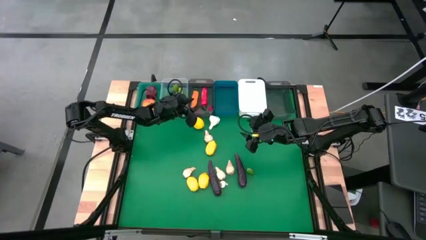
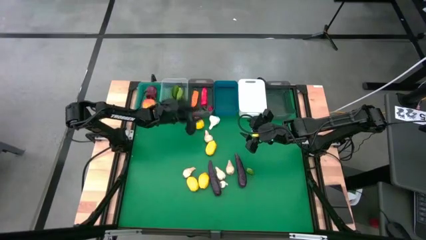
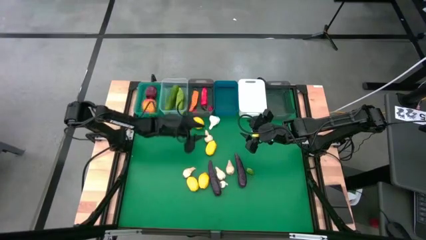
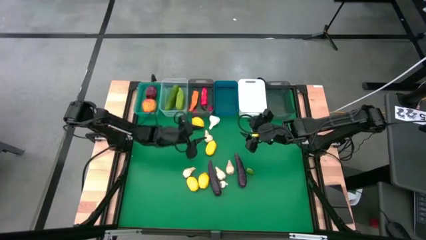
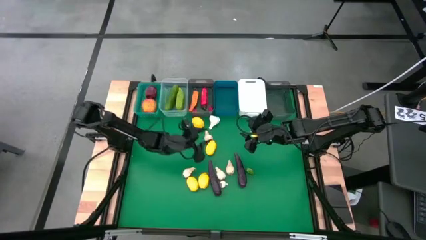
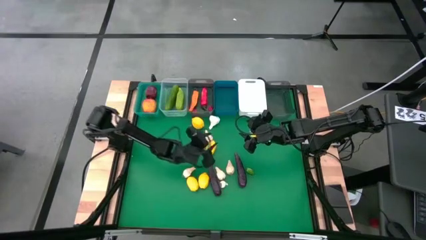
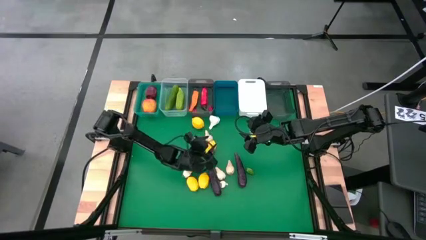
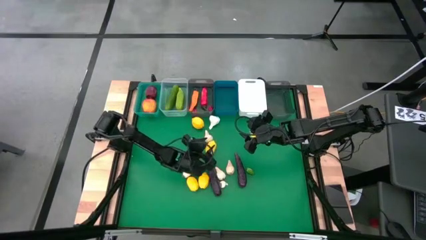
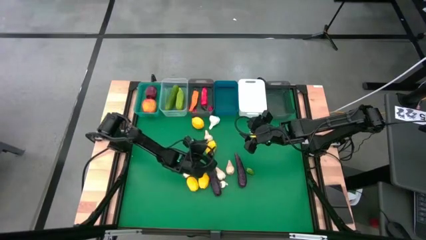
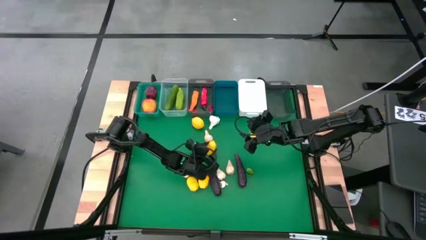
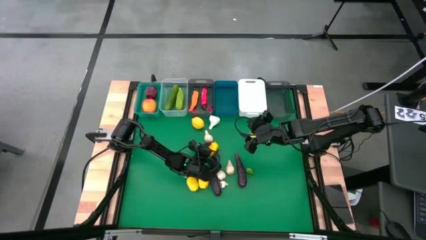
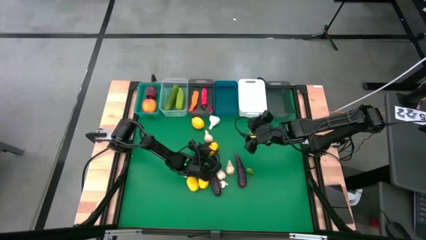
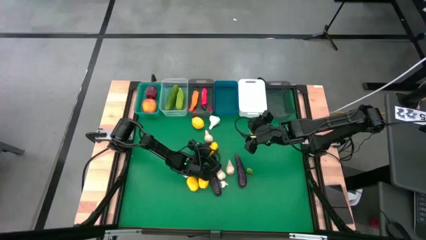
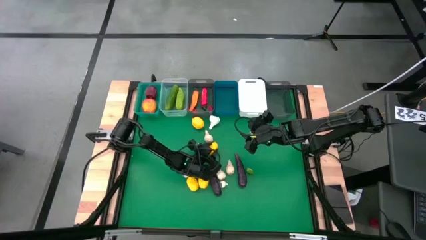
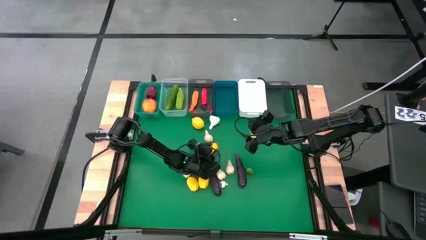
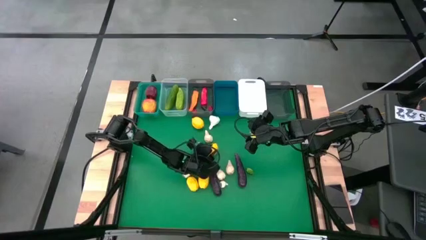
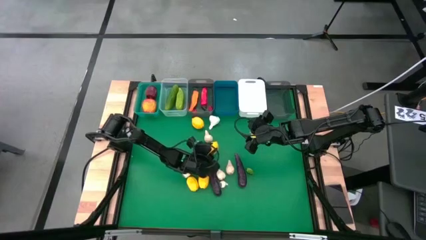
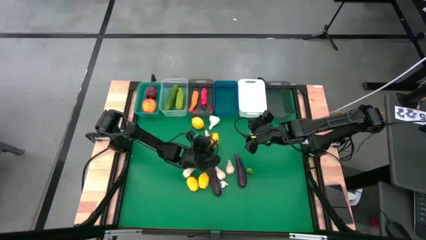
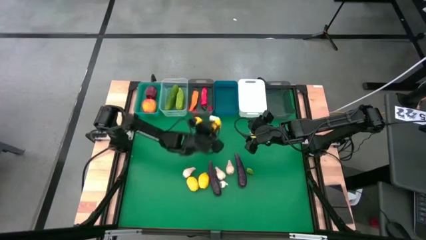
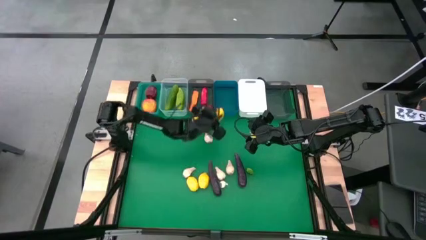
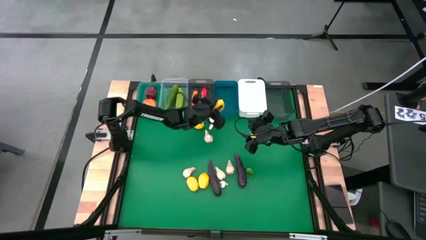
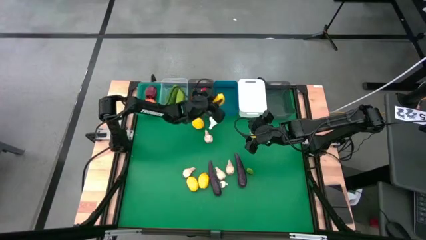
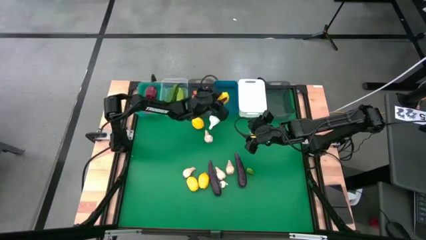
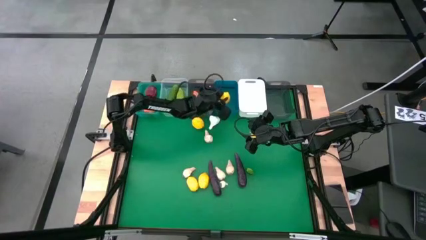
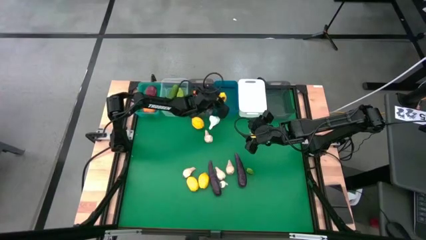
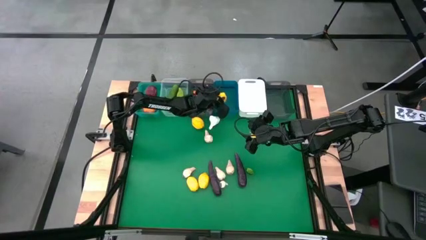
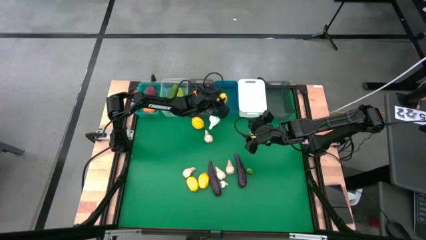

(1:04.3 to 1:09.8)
Task: Sort produce into baskets
Put the lemon into the blue bin

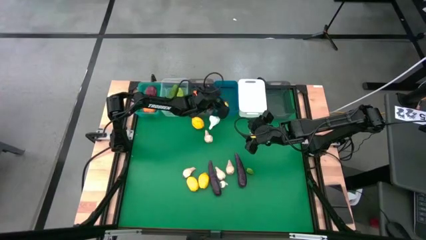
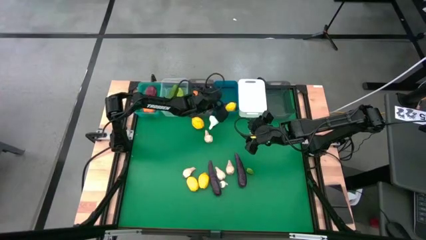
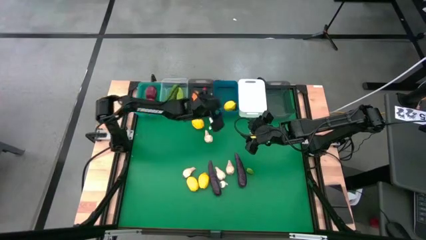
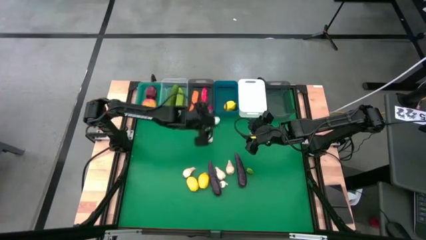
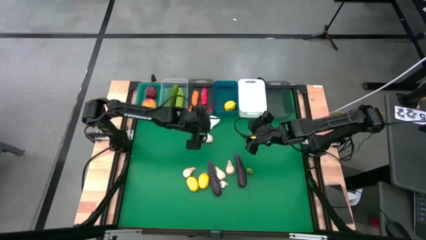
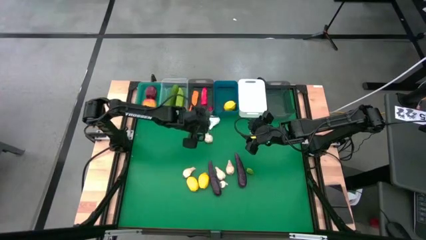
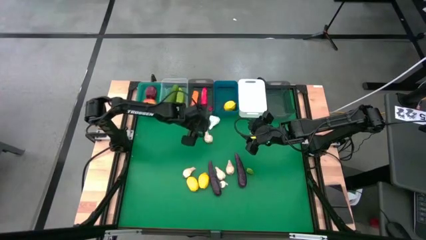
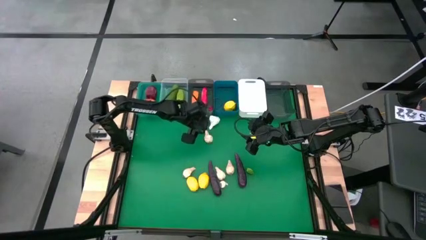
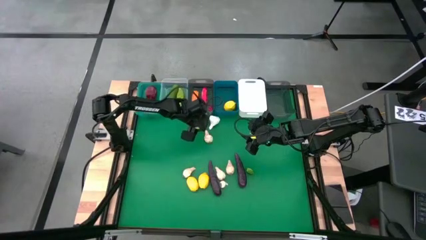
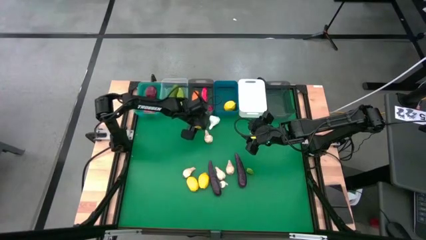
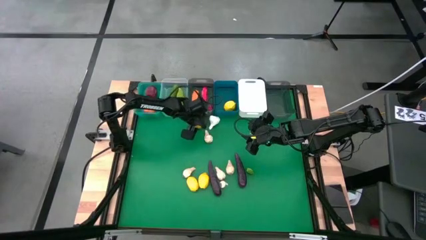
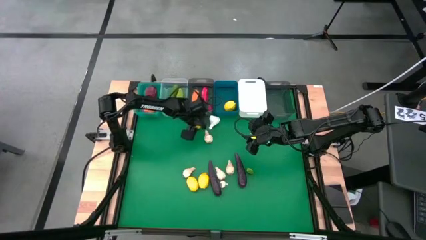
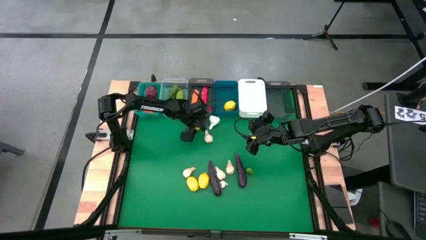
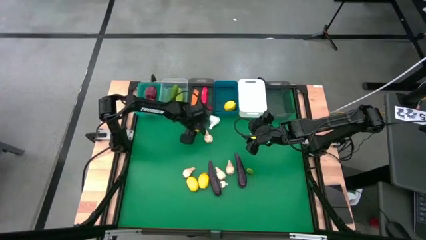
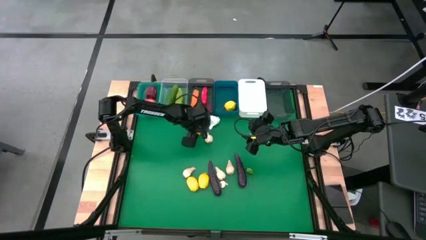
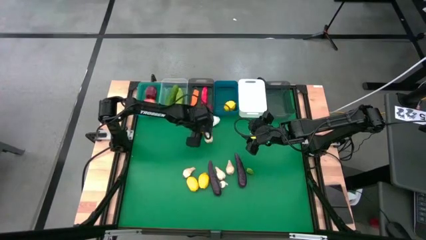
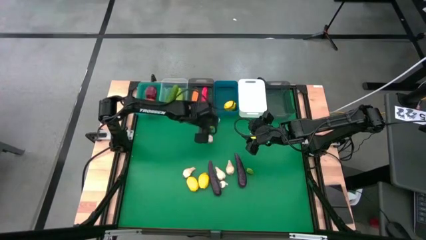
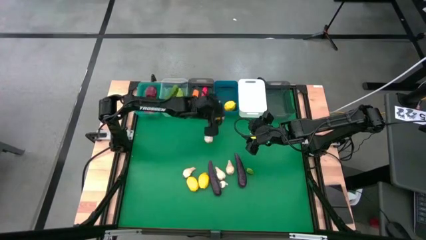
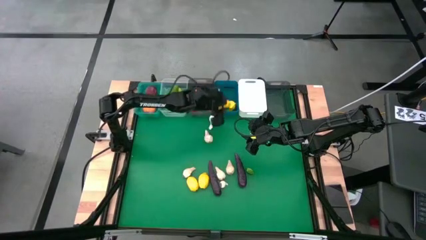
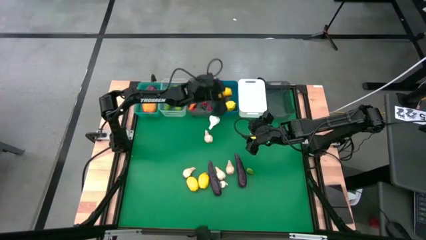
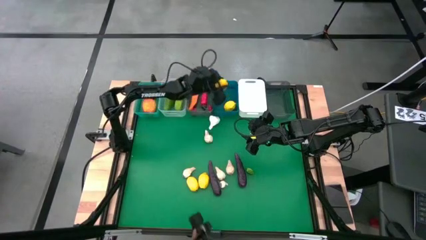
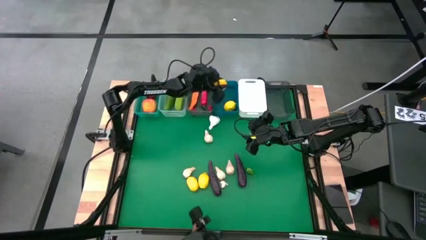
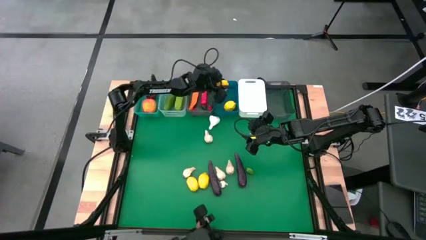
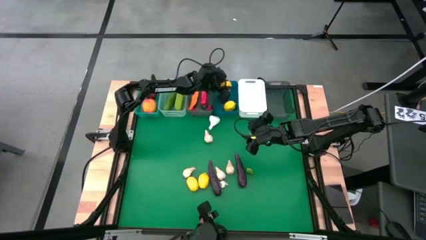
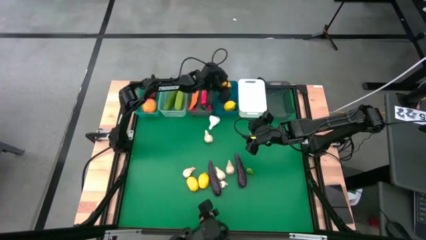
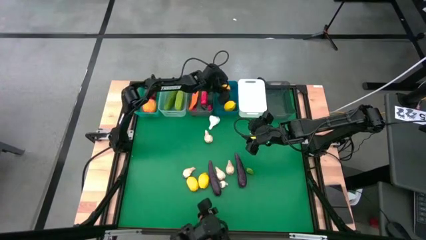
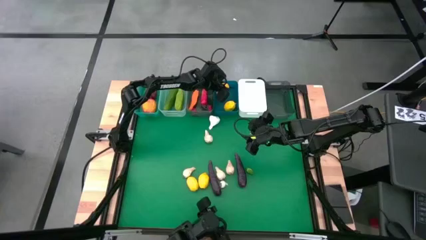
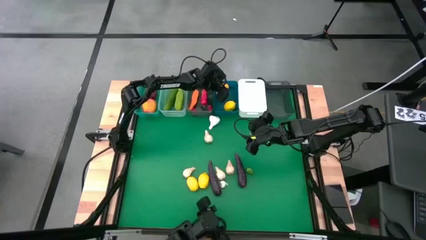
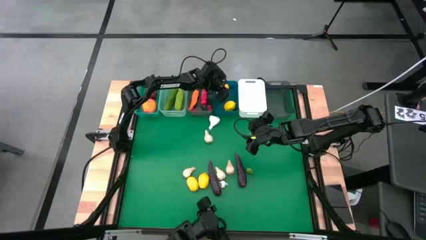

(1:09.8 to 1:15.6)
Put the lemon into the blue bin

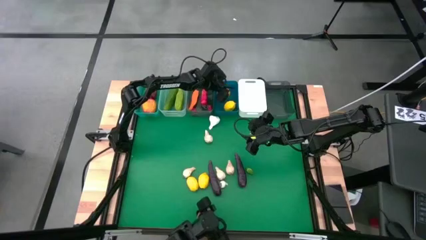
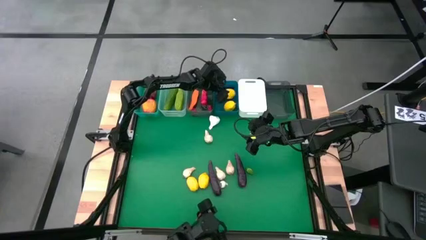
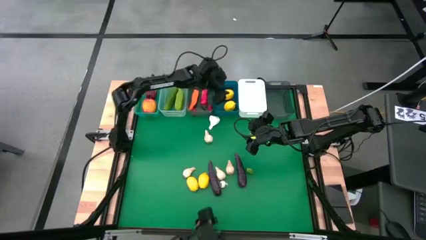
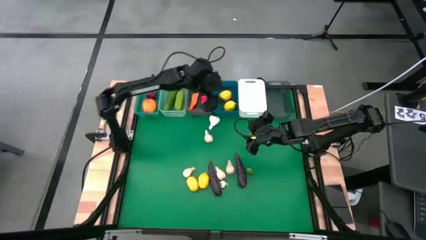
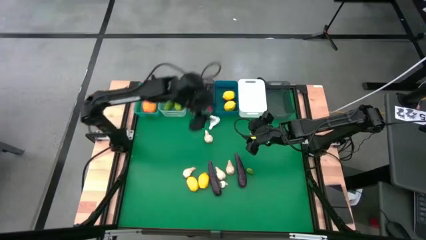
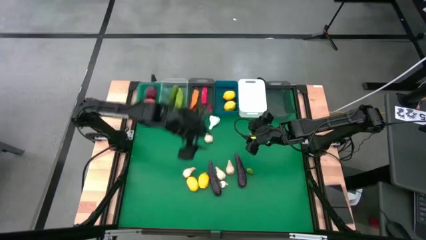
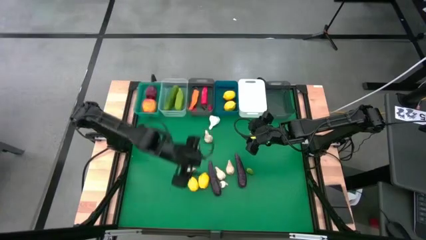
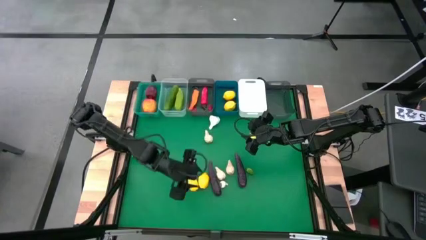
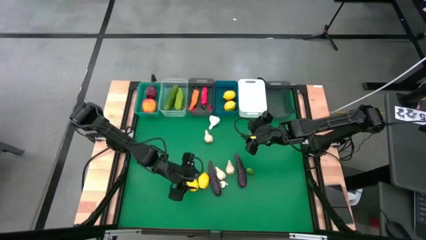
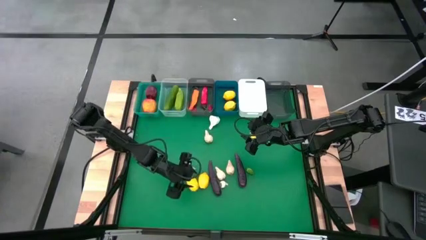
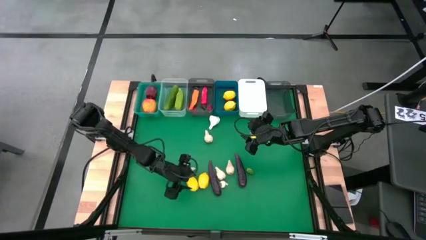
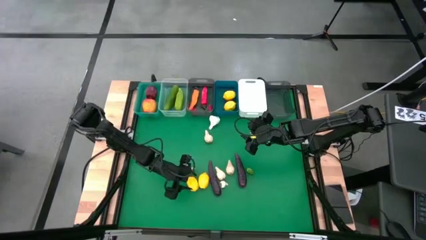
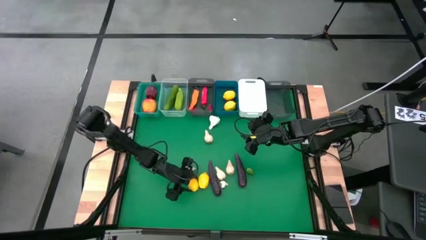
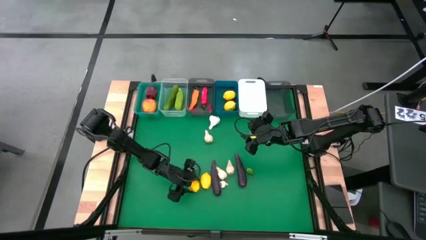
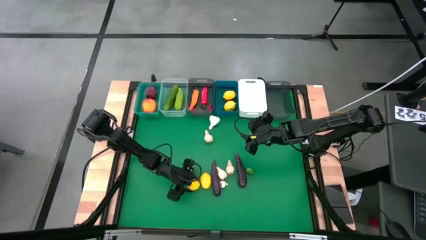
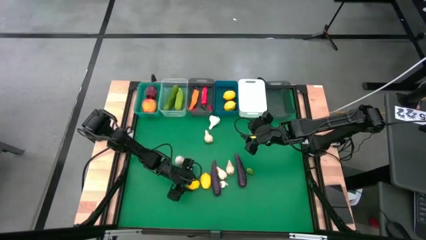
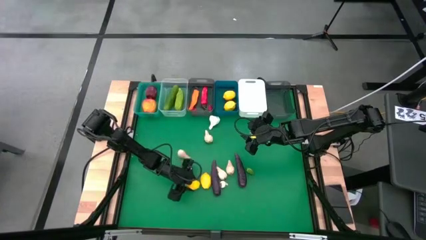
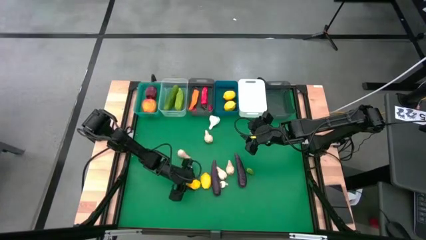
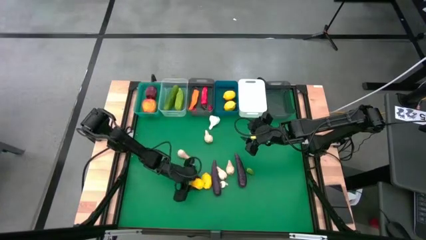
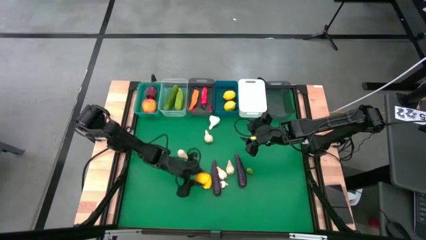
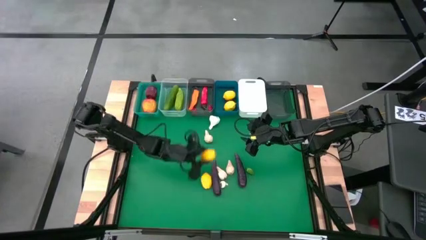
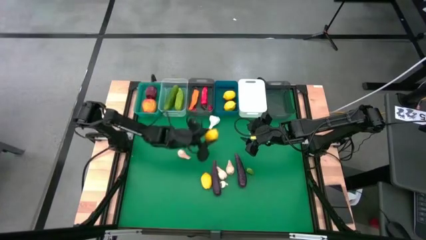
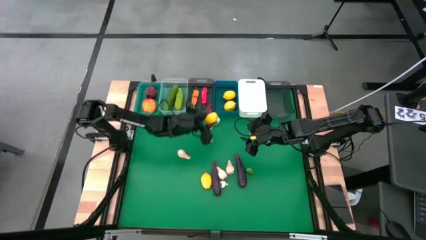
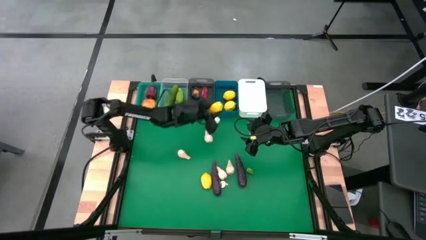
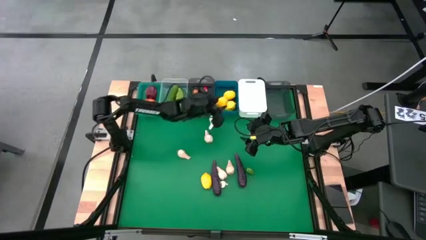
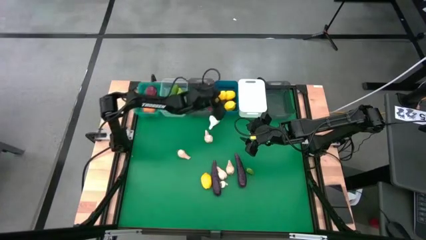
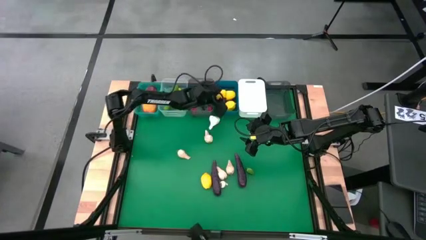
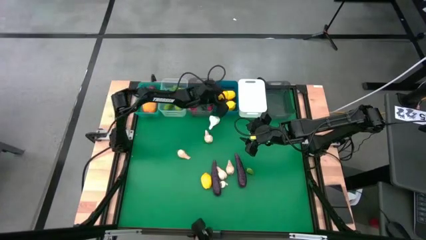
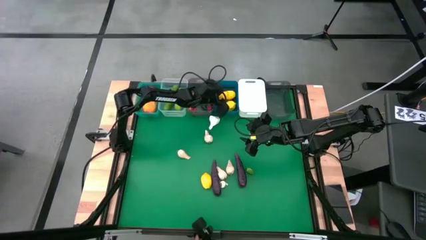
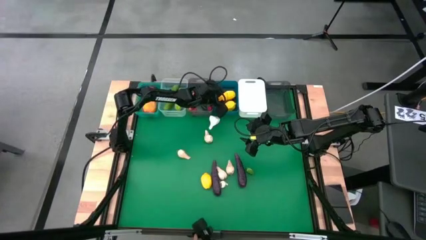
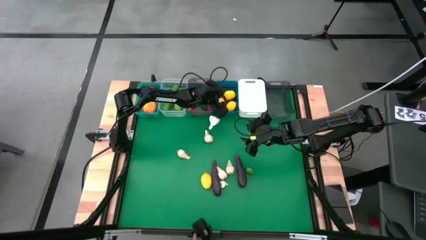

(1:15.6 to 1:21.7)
Put the lemon into the blue bin
